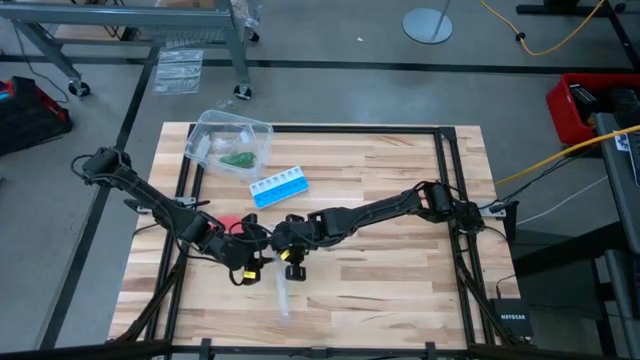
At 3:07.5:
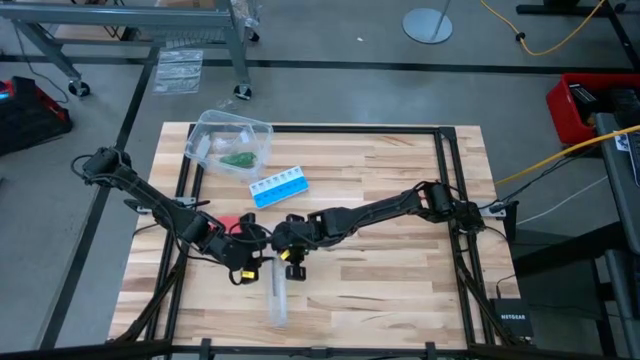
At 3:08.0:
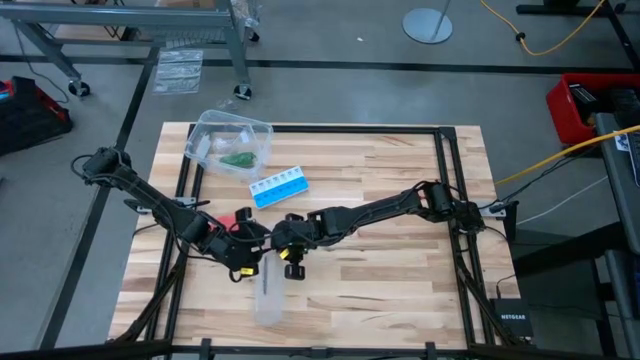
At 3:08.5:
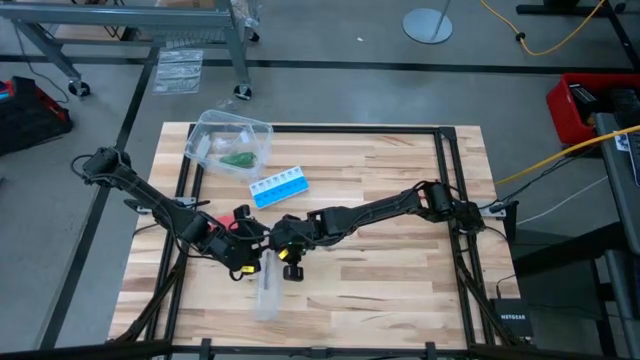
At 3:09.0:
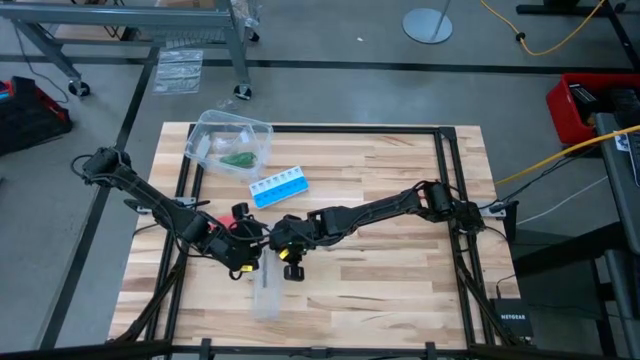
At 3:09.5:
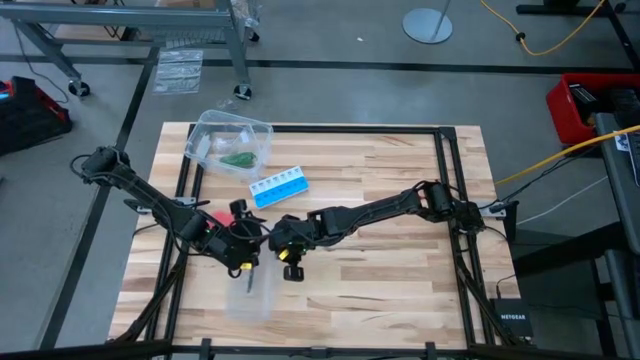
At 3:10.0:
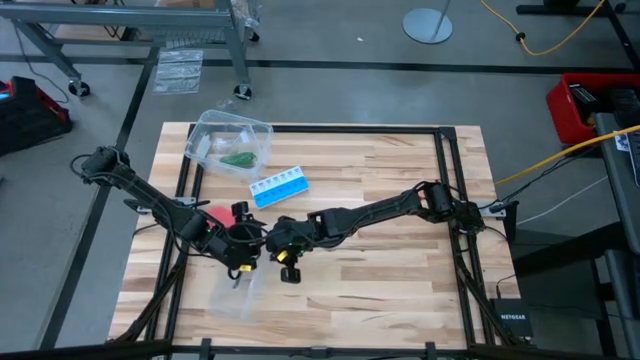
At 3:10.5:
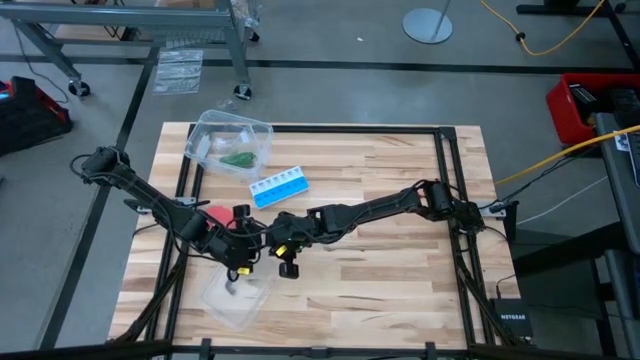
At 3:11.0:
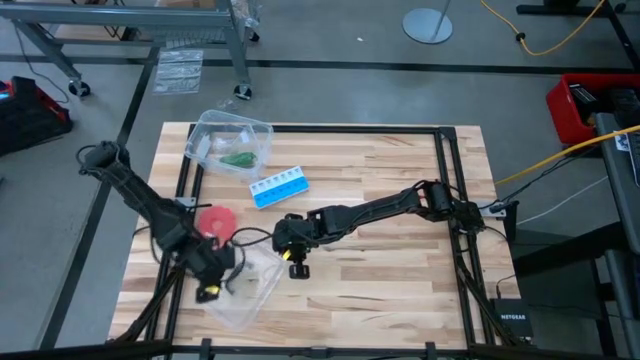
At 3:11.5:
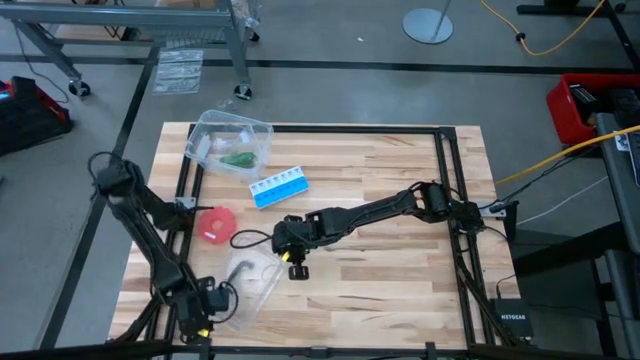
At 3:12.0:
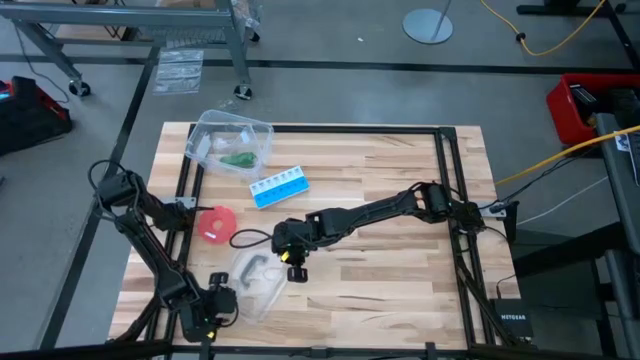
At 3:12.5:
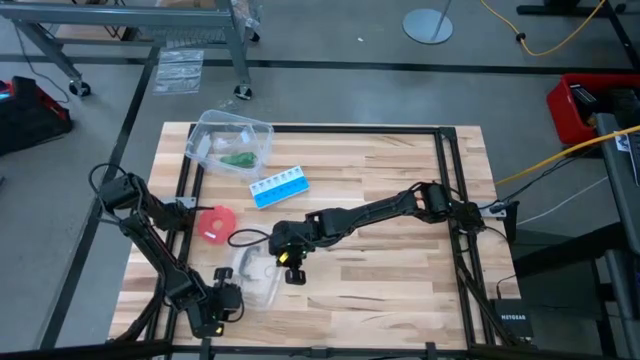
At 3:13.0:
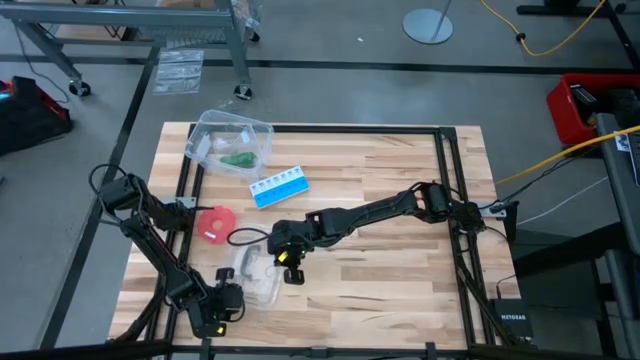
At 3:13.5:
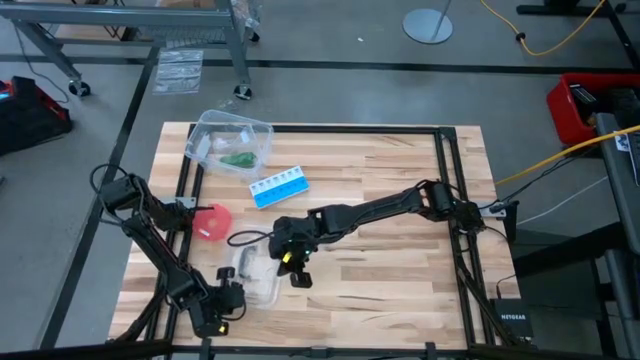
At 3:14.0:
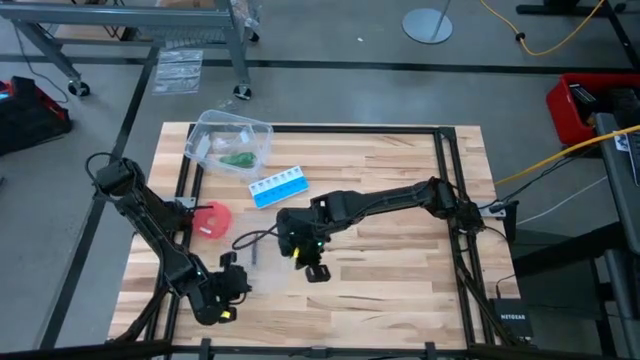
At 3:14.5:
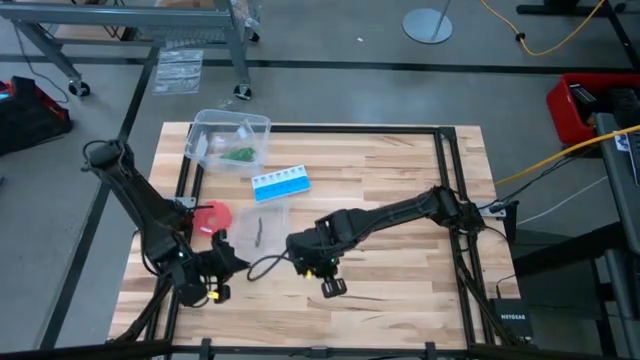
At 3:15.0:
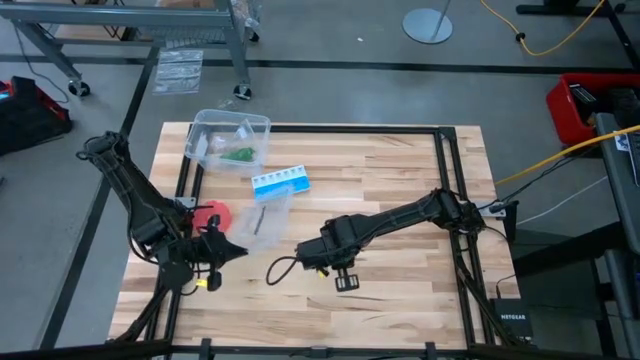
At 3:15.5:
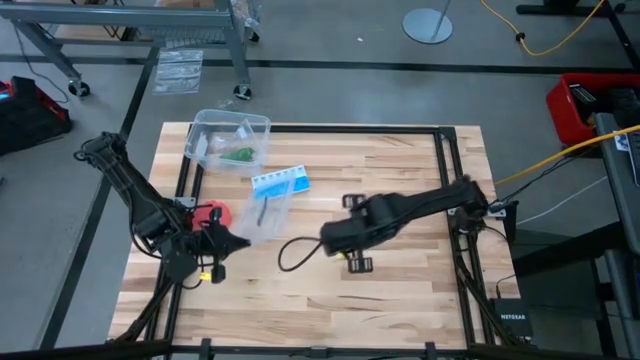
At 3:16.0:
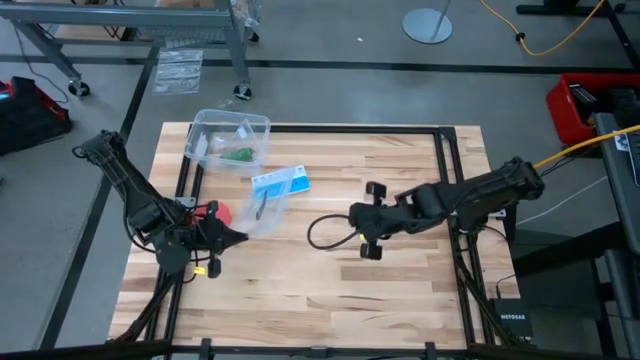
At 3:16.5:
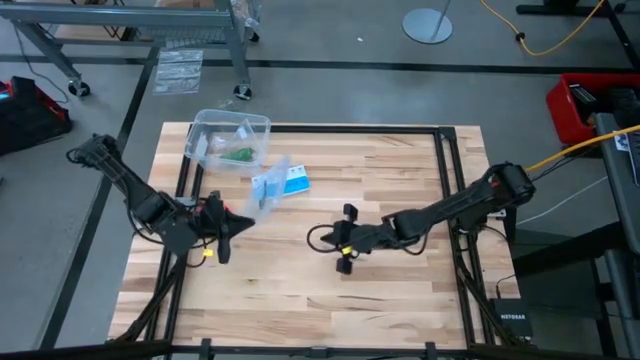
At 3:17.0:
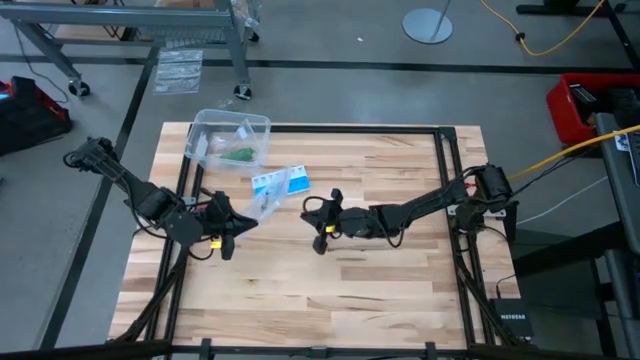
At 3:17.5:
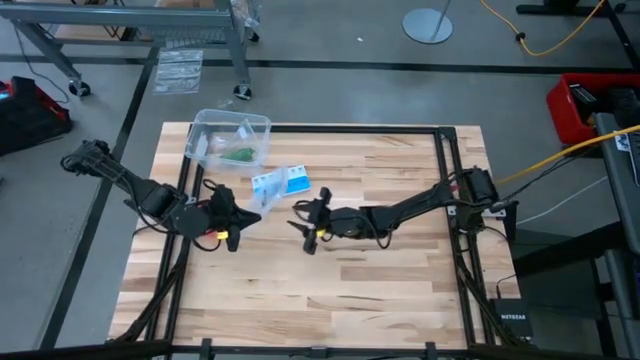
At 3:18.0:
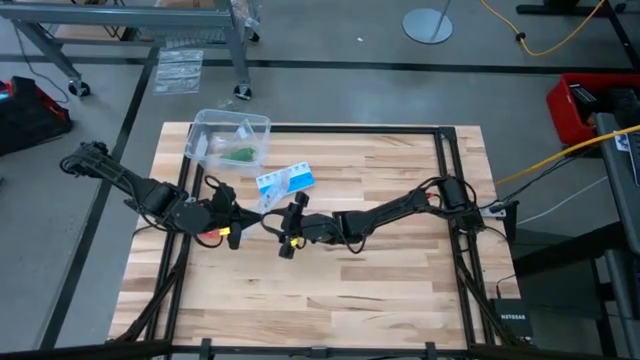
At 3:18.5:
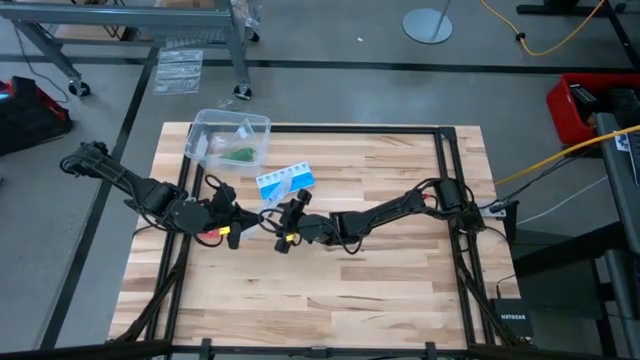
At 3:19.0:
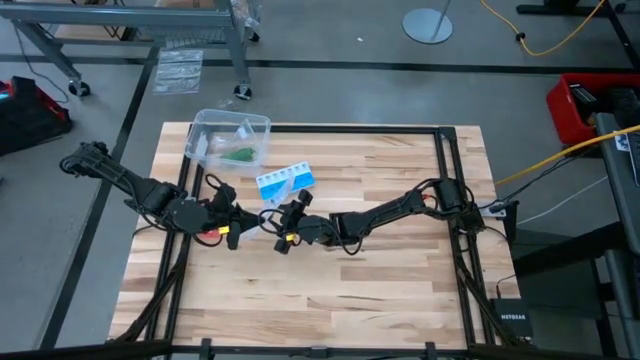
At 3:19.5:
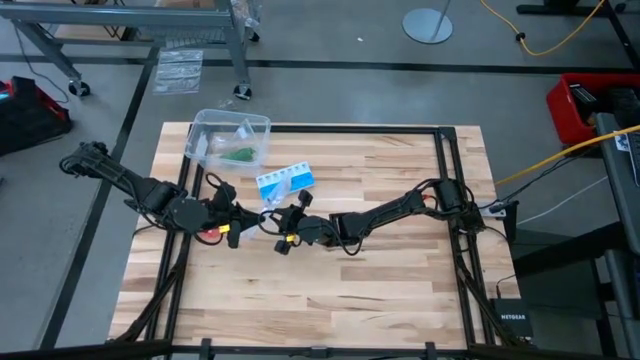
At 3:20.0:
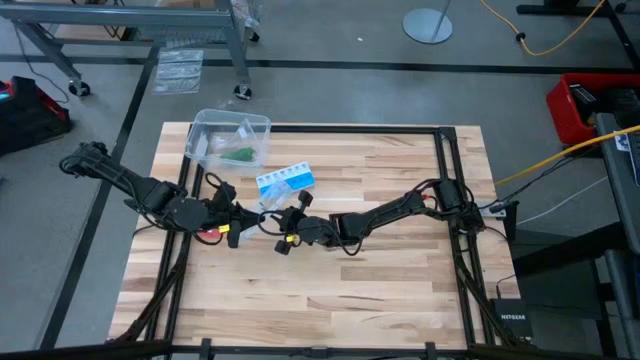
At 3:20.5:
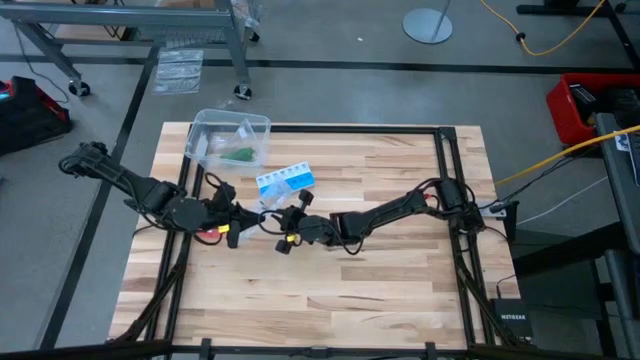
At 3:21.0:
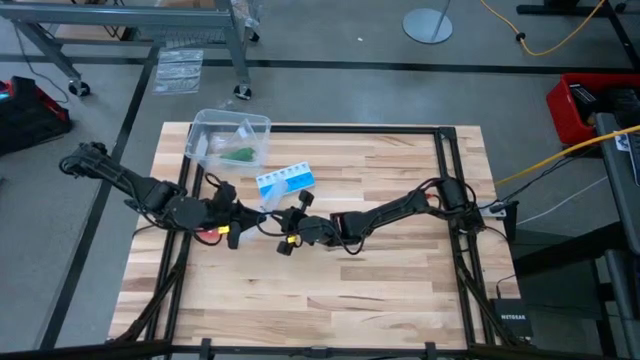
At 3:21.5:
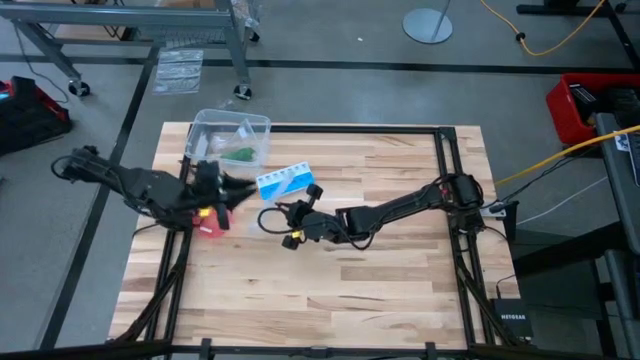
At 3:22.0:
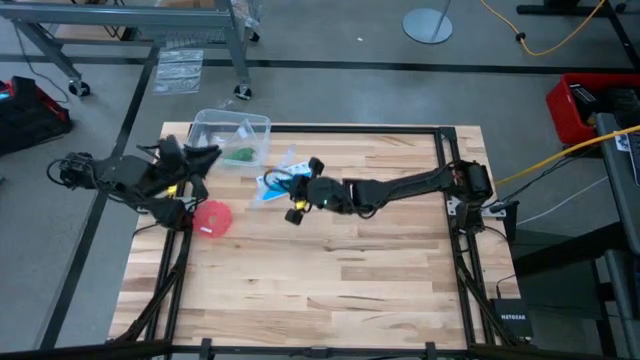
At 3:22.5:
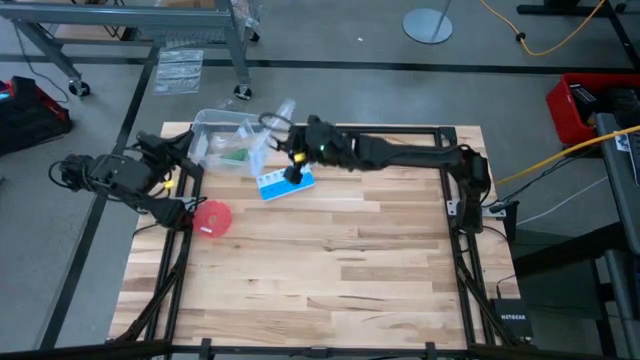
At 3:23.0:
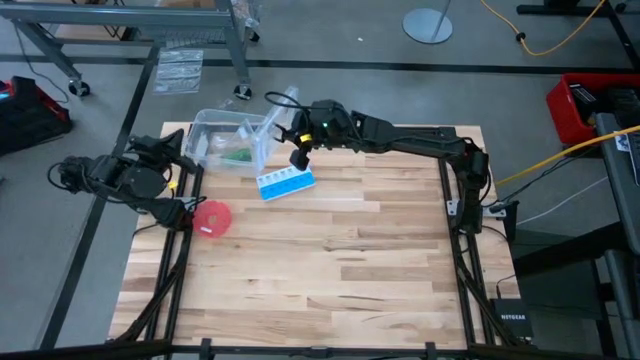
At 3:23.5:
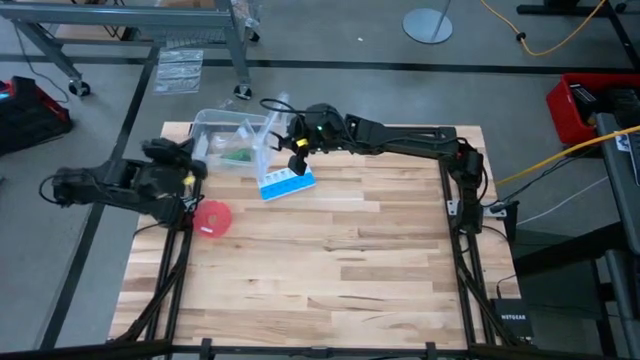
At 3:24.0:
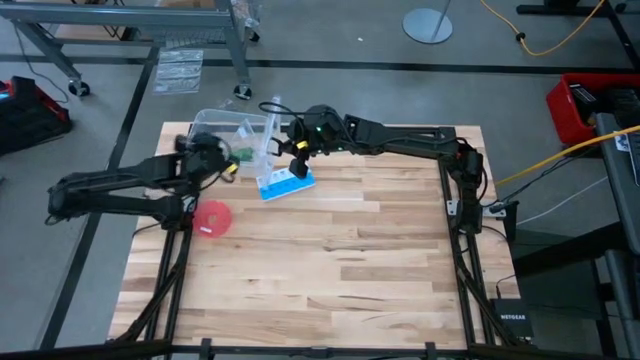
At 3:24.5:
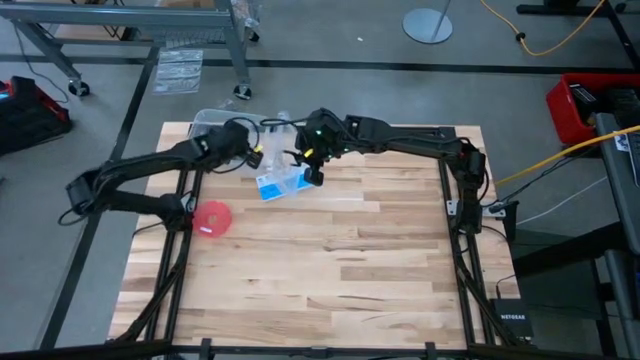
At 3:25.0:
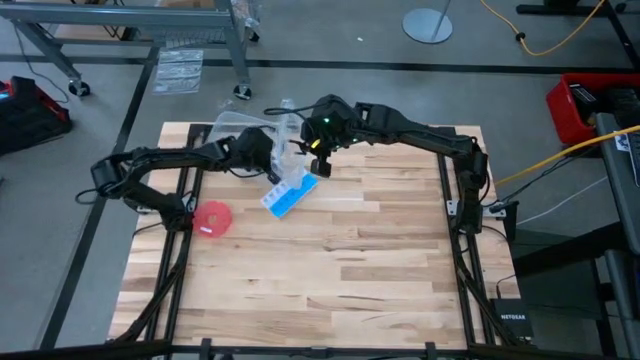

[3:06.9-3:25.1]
Task: Roll bandage
Close the transparent container

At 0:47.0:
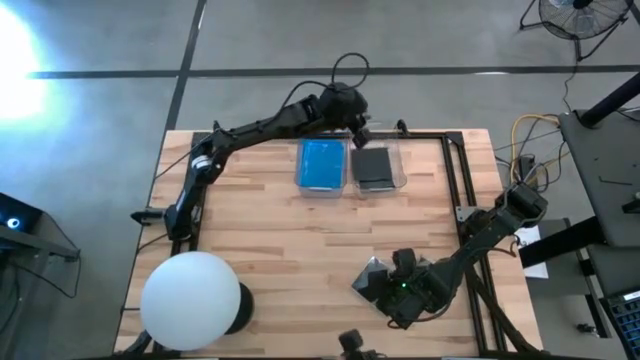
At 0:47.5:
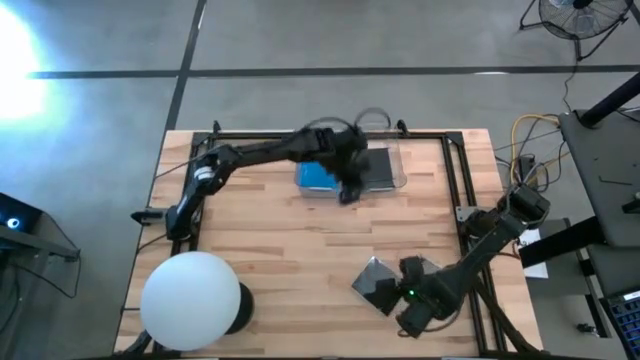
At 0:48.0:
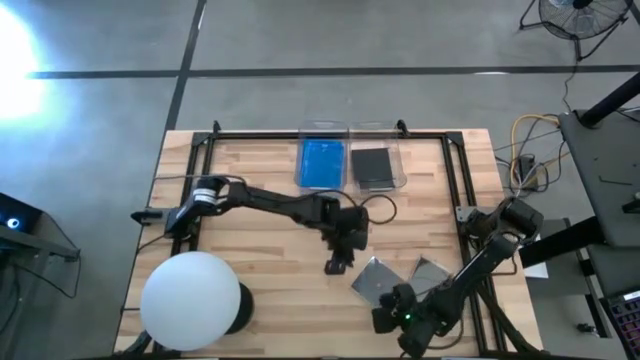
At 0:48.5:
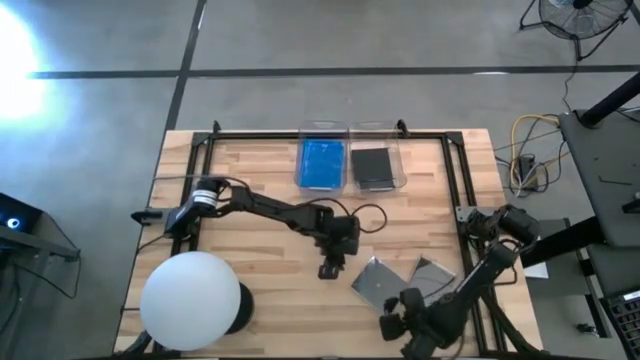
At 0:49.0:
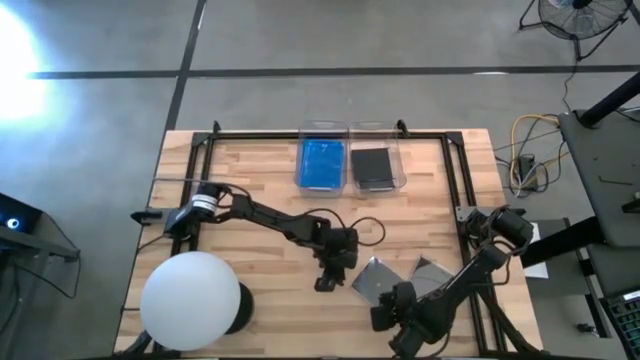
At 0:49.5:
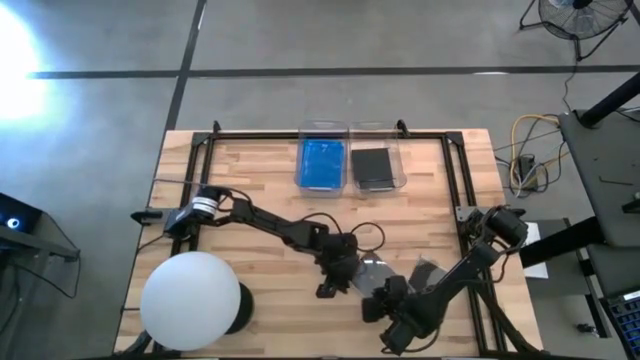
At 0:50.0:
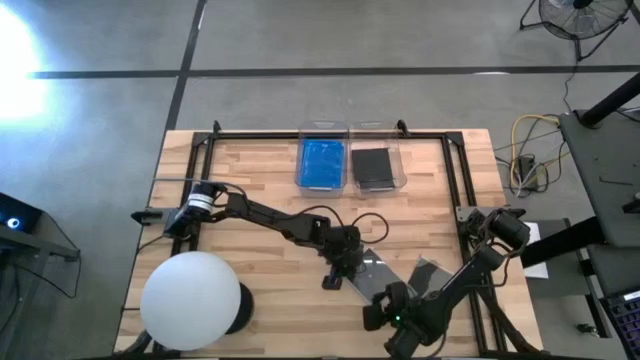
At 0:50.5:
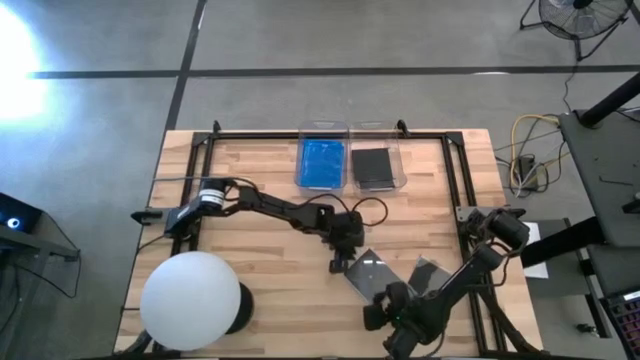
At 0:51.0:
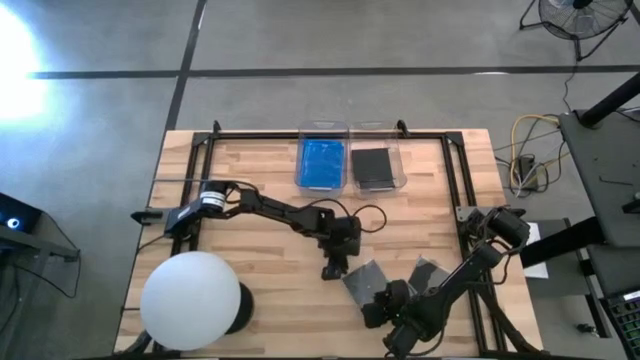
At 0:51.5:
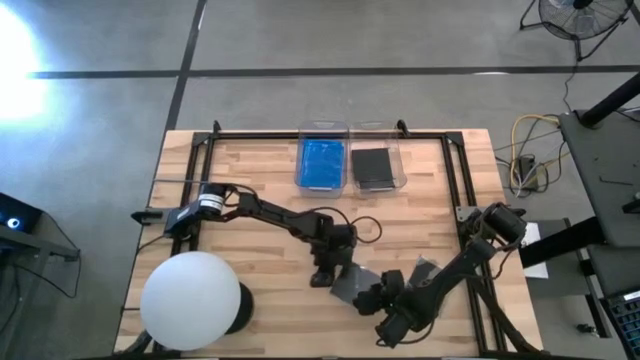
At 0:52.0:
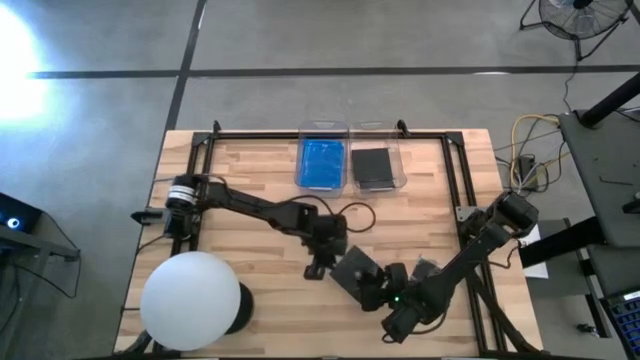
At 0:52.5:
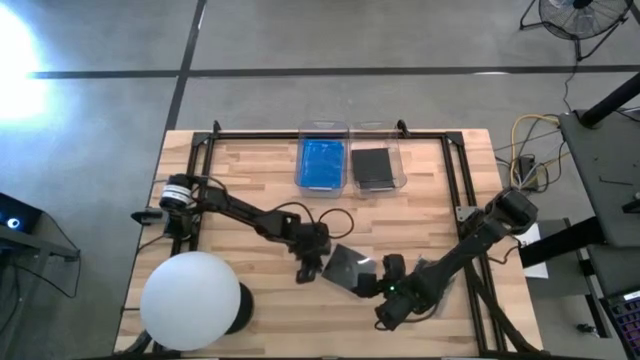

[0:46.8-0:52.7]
Task: Pick & place jewel cases by type
Put the black CD case into the right transparent bin
